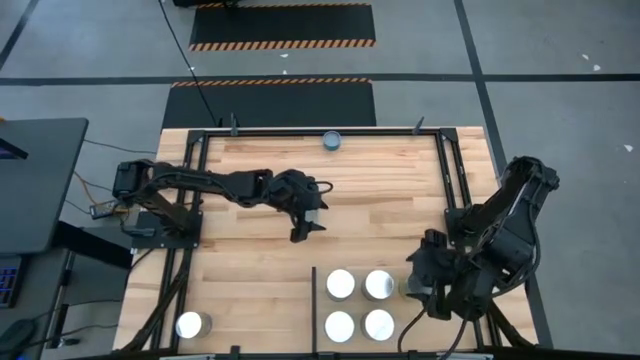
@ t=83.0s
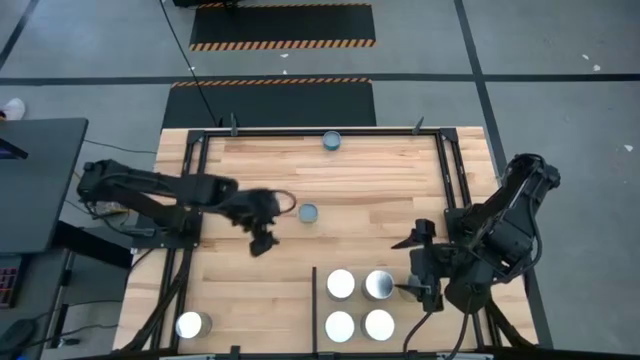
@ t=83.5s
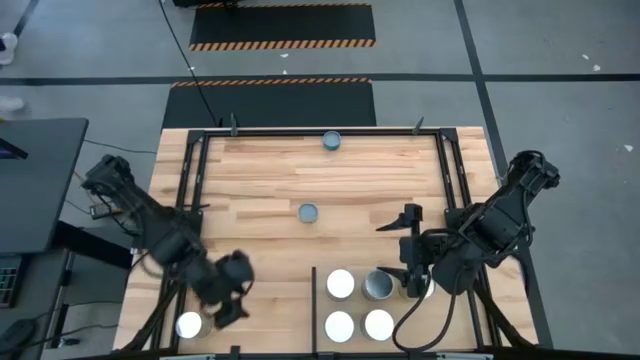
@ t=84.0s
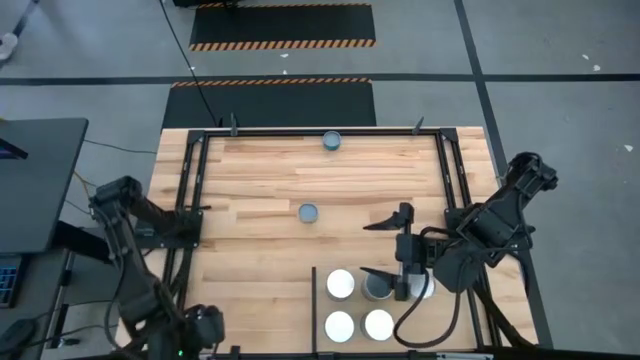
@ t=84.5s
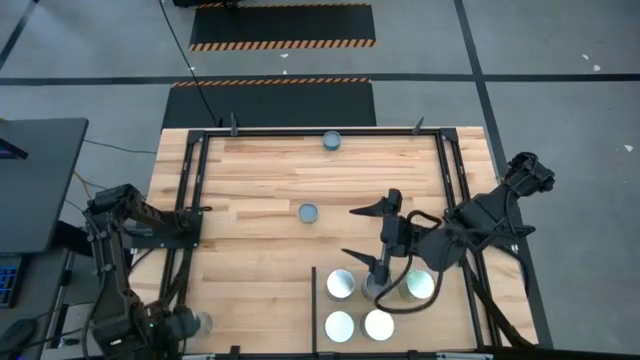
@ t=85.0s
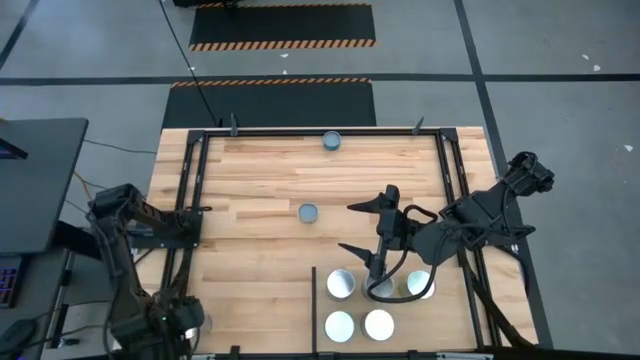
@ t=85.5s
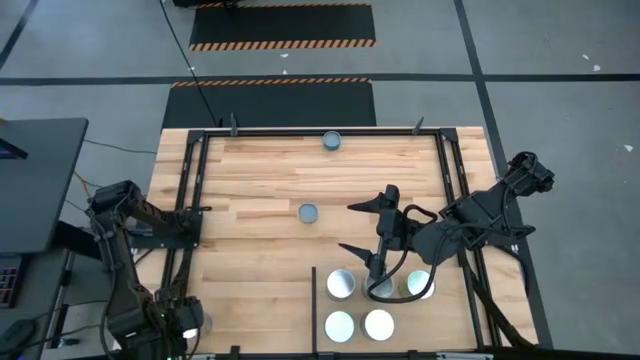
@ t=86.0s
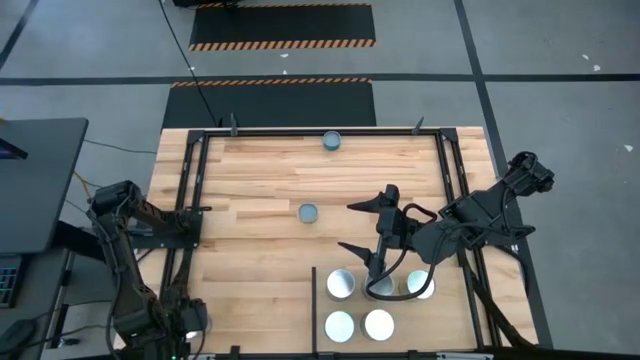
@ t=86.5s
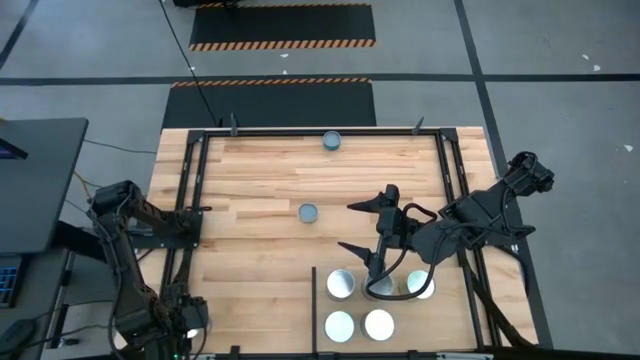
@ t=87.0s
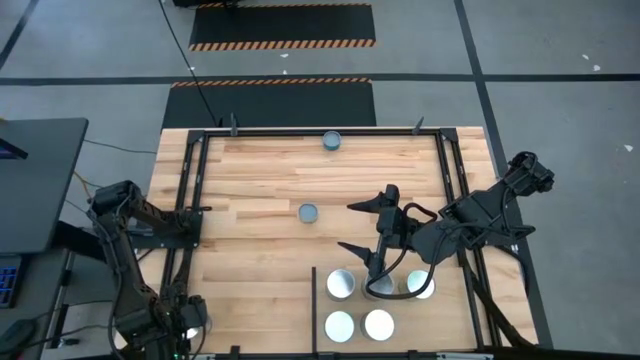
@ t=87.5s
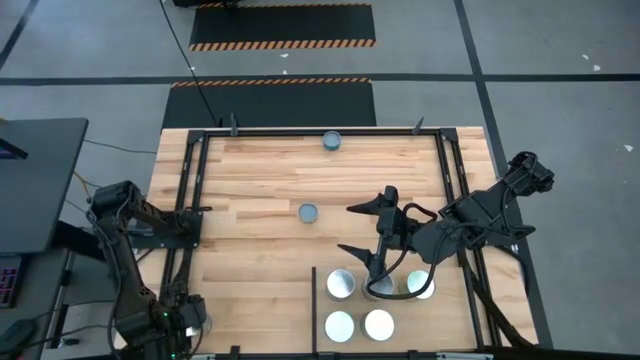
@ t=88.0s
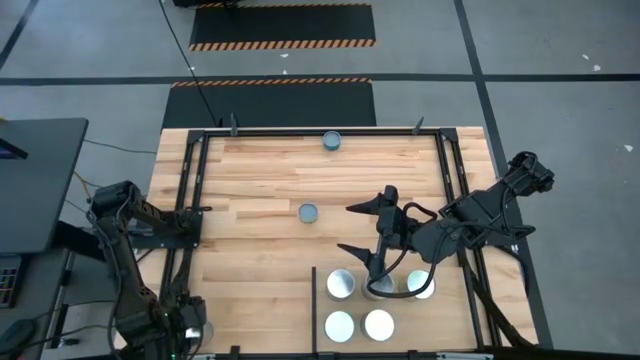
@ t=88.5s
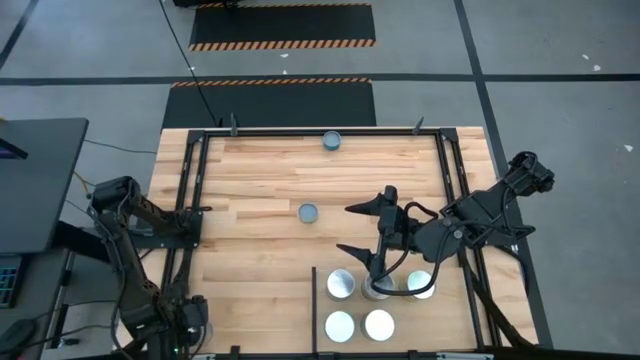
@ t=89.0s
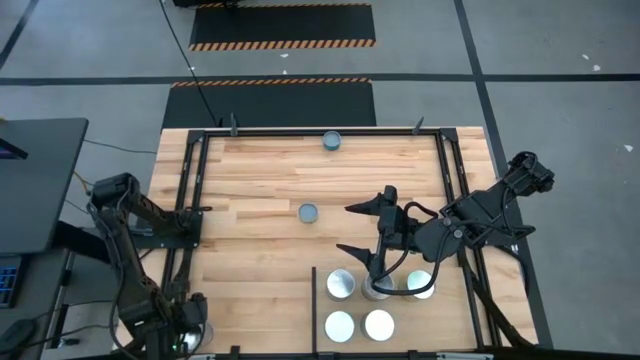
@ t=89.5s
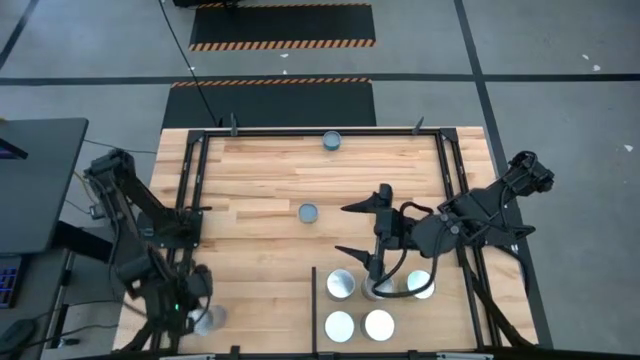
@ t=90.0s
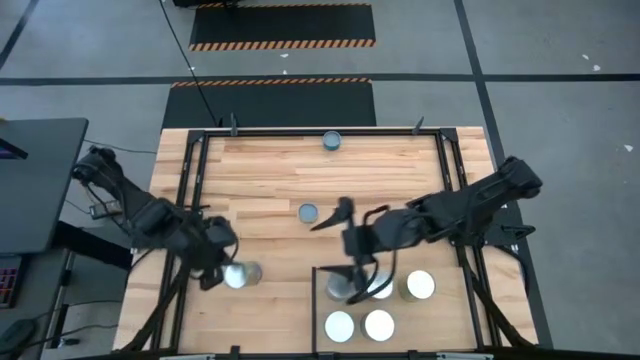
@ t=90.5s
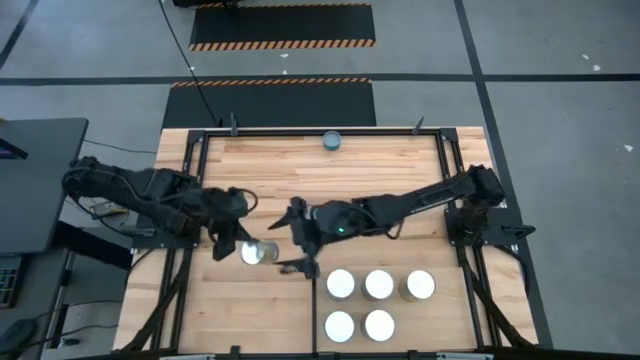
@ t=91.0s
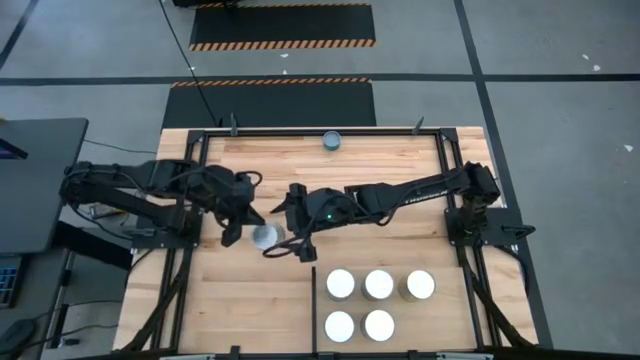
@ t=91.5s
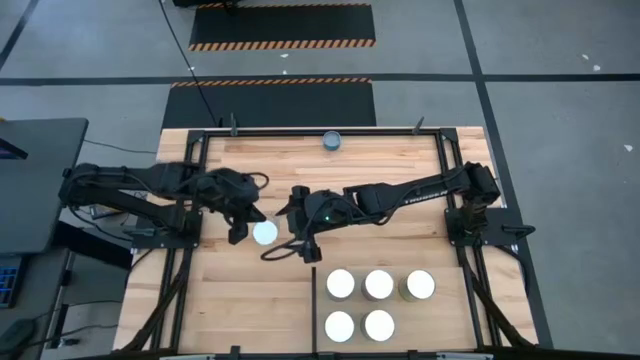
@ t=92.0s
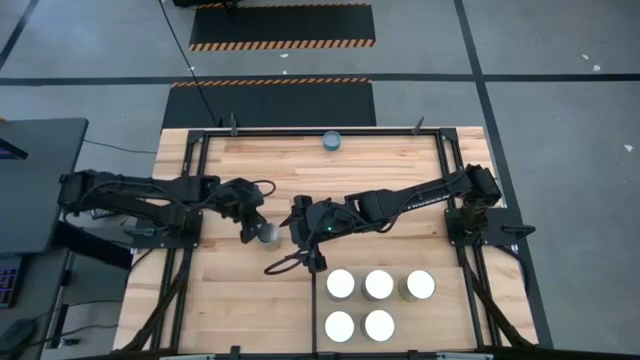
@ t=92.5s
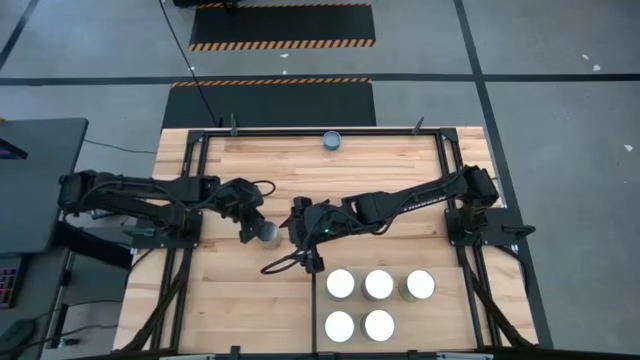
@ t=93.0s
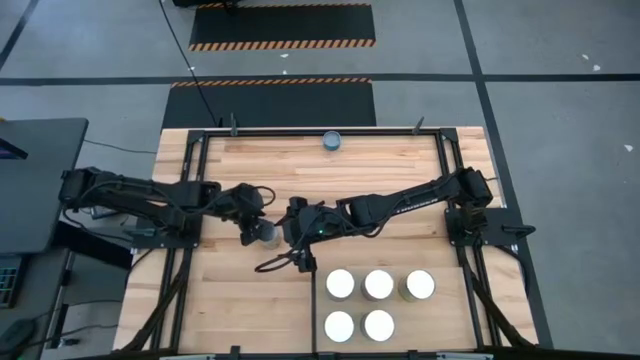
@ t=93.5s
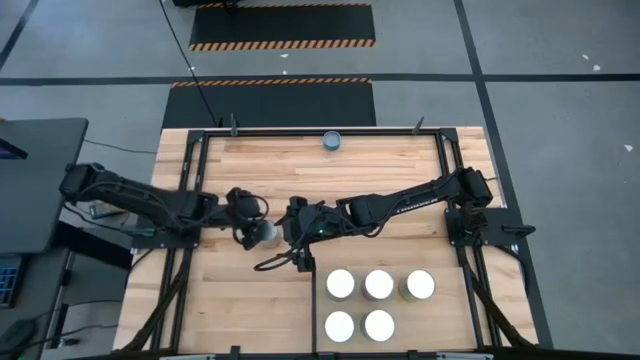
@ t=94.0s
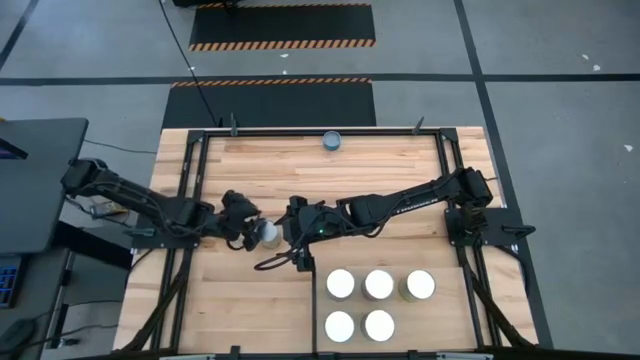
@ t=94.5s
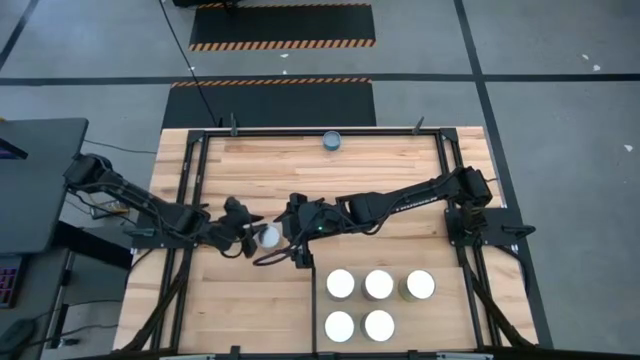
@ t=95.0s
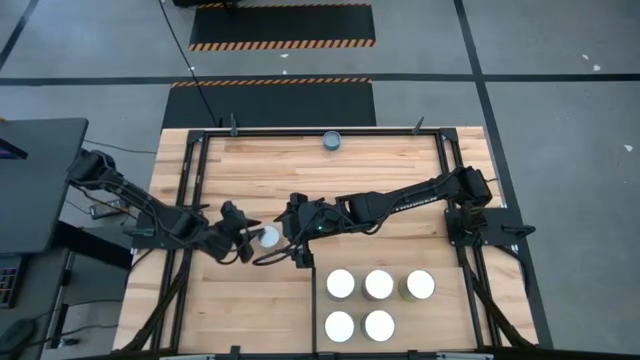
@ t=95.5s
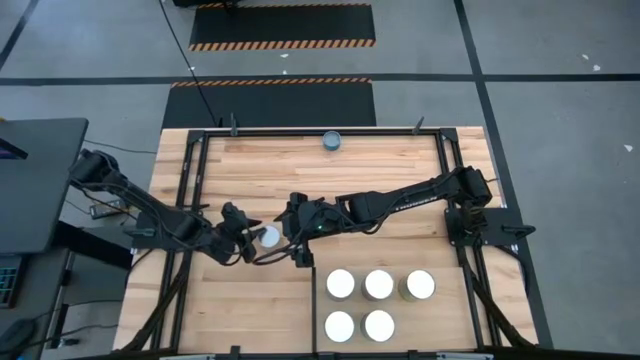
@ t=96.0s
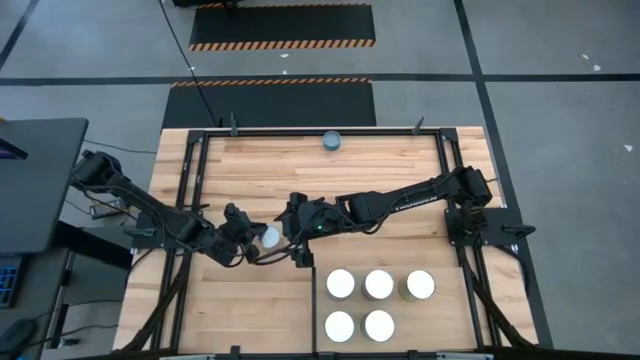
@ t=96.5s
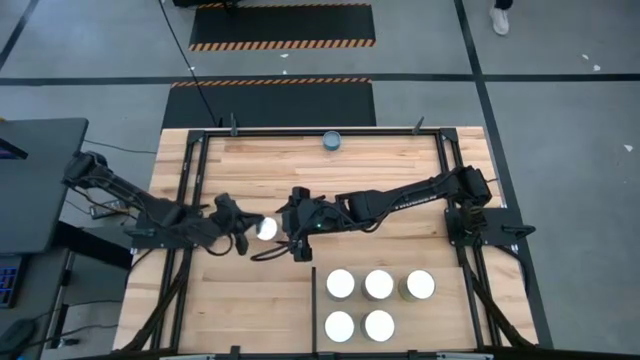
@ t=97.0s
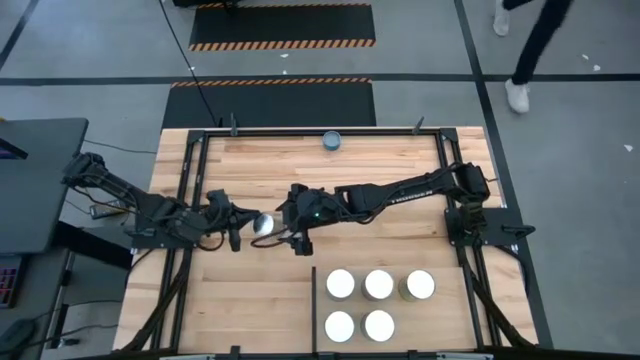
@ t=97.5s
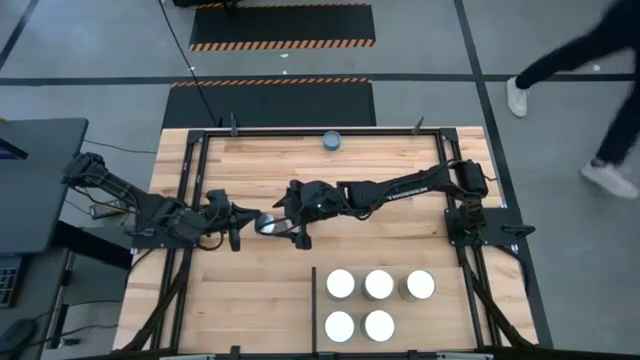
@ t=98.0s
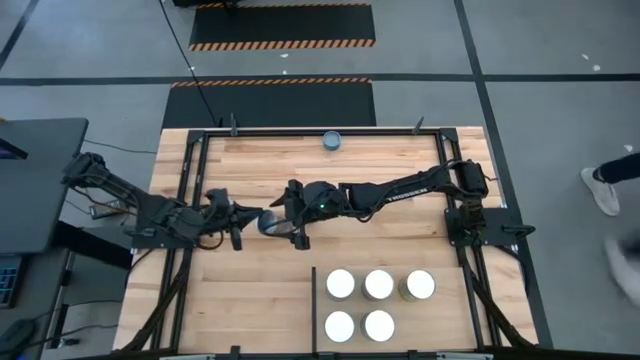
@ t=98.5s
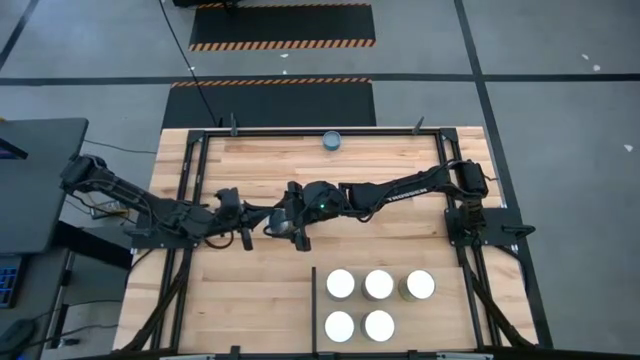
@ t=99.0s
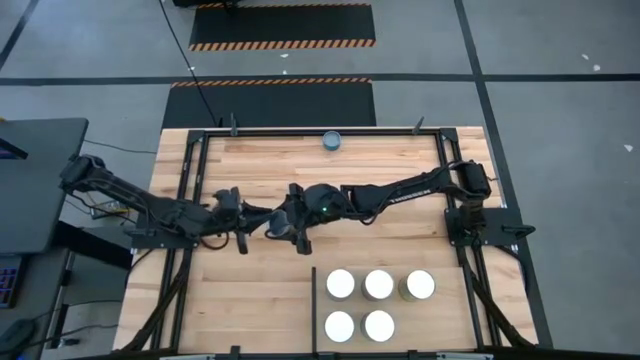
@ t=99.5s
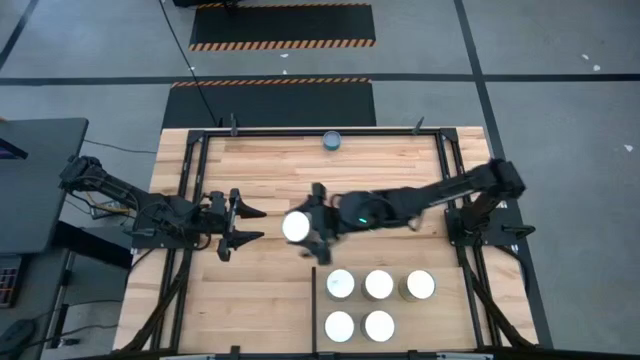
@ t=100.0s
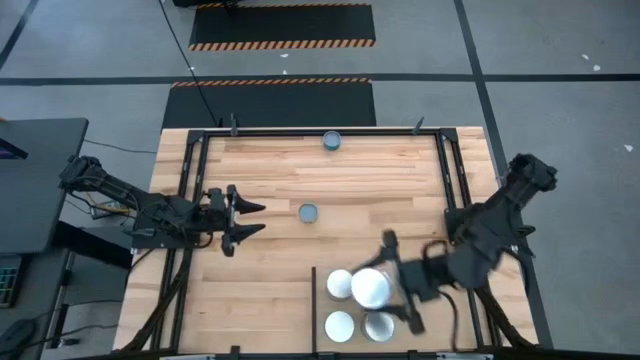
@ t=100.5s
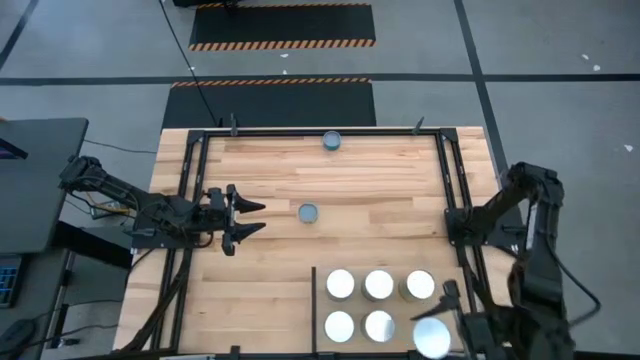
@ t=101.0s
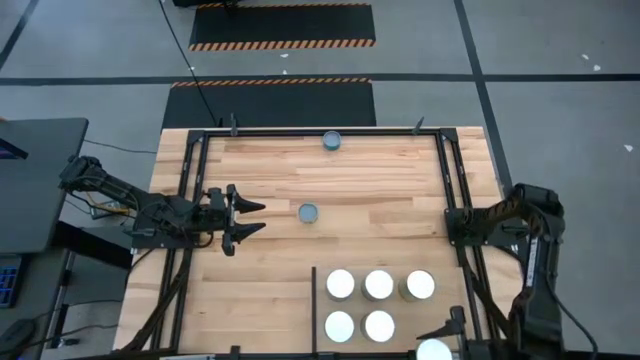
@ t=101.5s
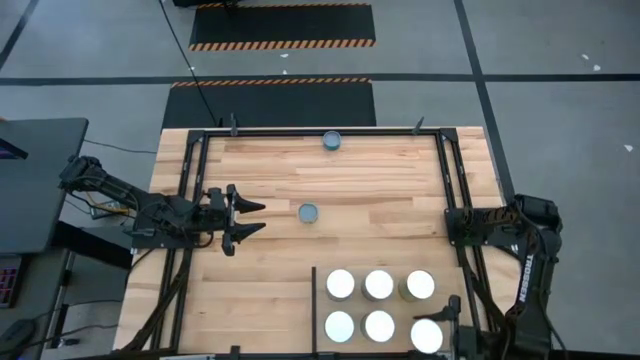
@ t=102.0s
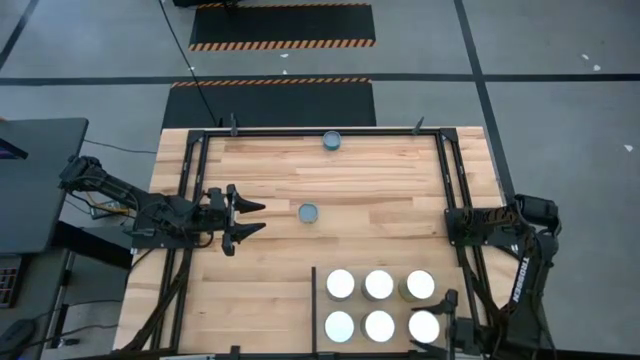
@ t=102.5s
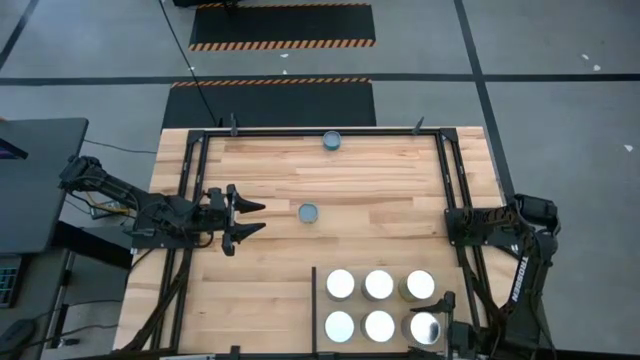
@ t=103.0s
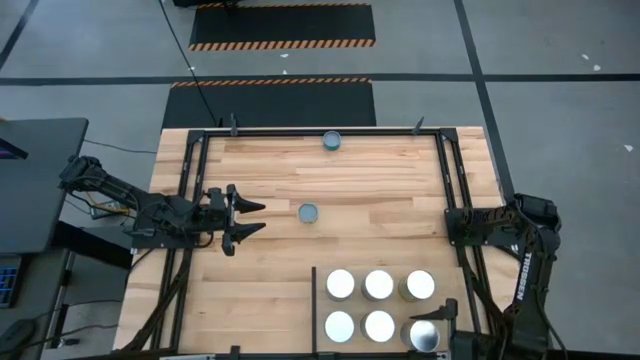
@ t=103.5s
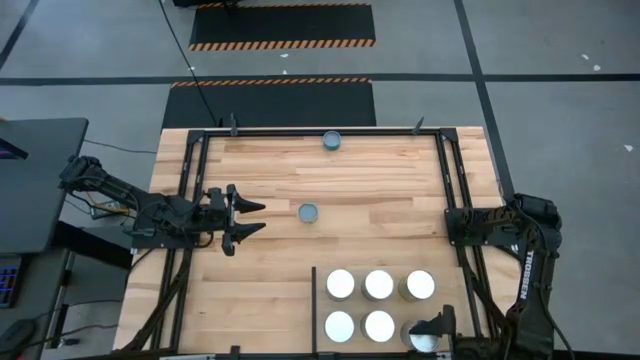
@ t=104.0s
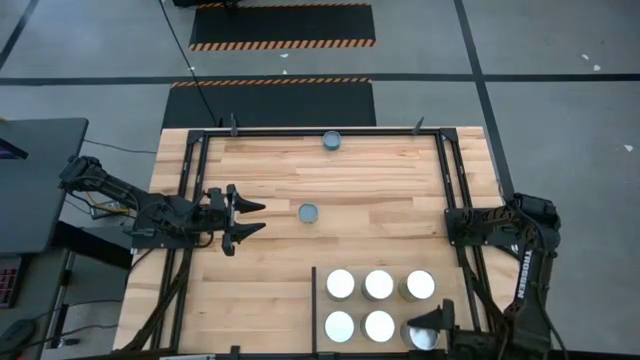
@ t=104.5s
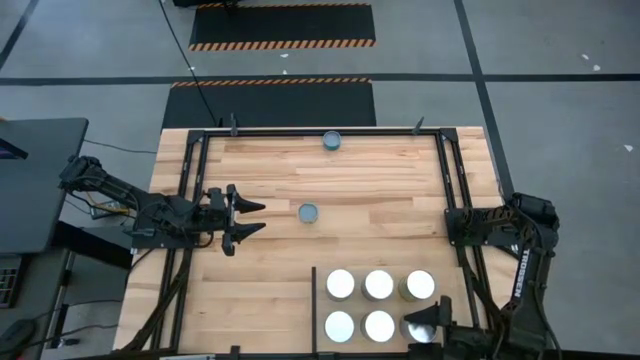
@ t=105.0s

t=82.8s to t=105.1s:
Task: Pick and place cans onto a shelf
Put the canned carrots aligned with the other canned carrots on the shelf
